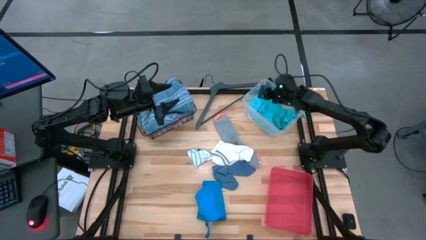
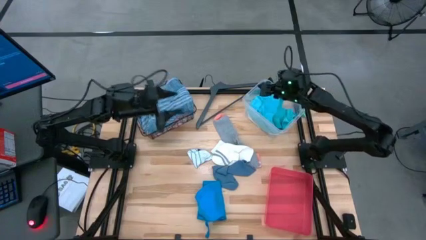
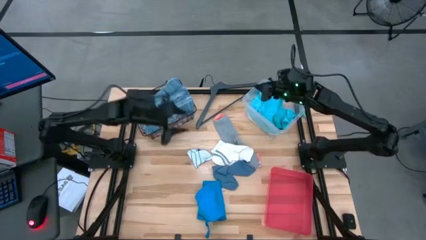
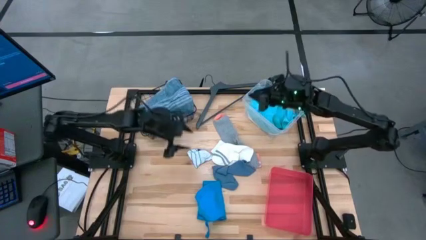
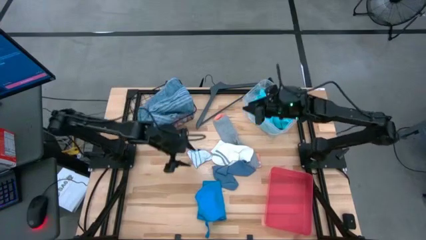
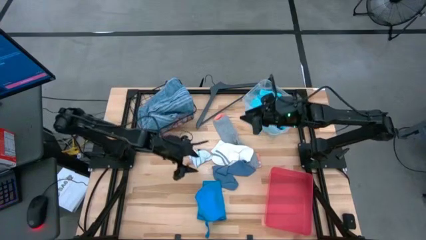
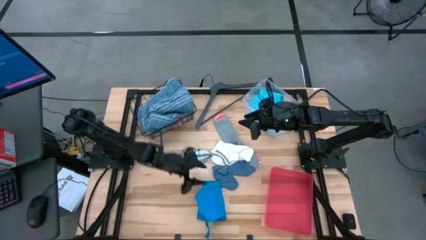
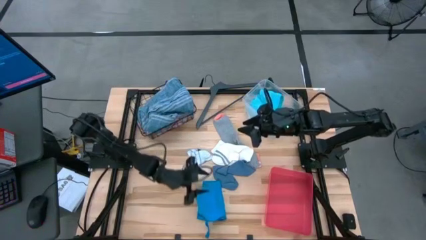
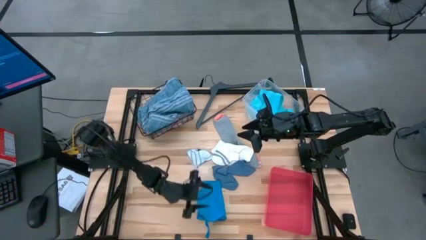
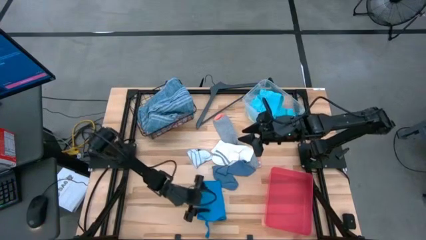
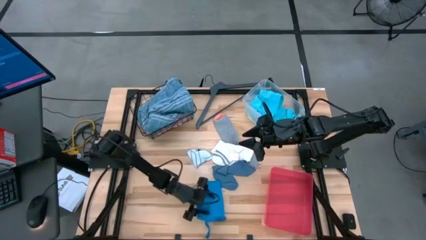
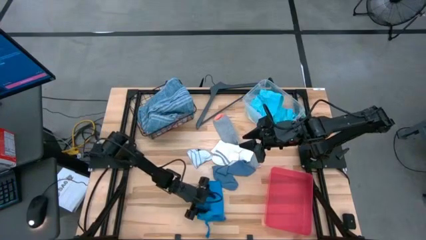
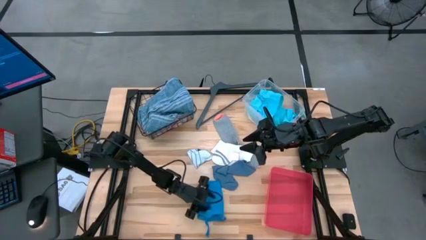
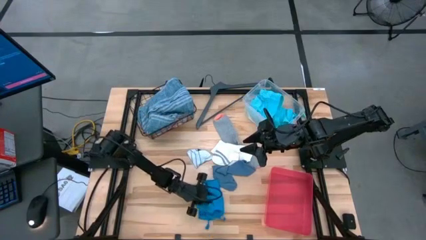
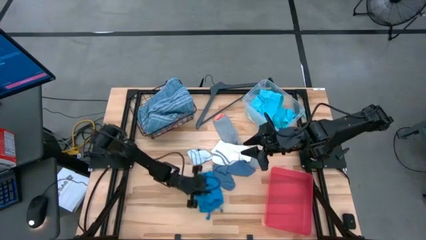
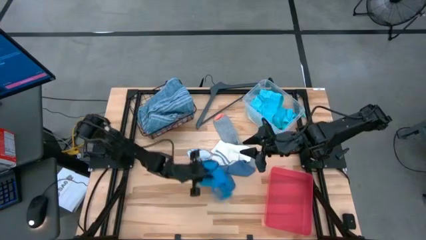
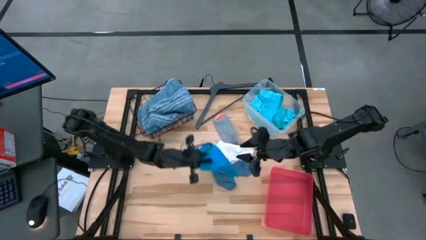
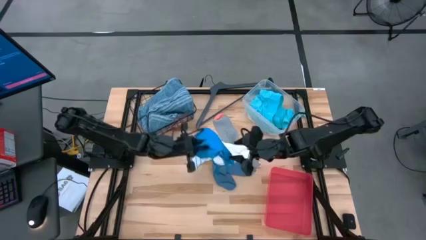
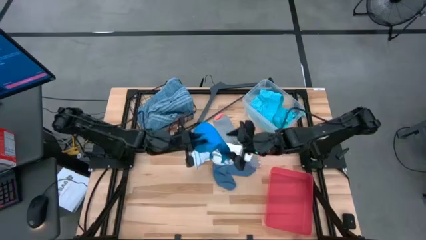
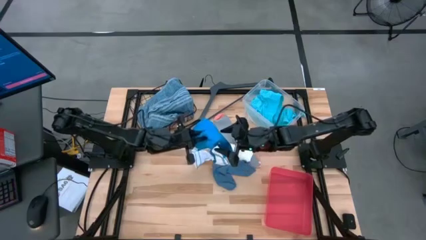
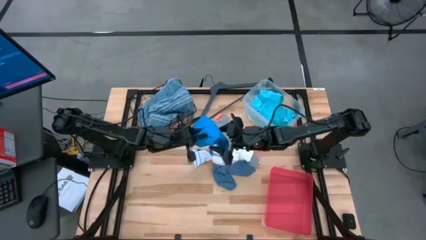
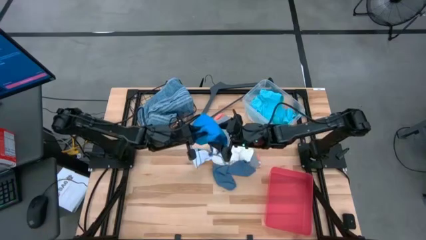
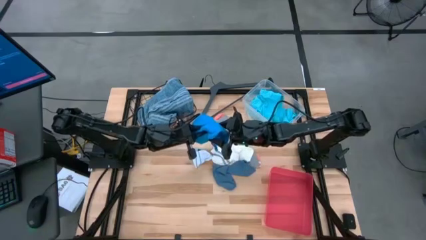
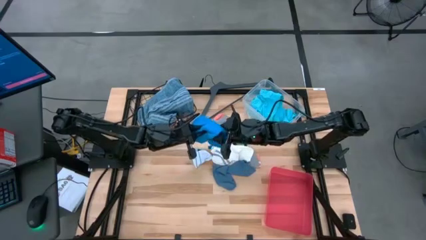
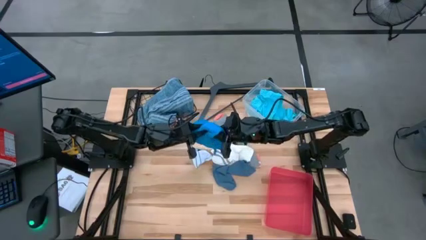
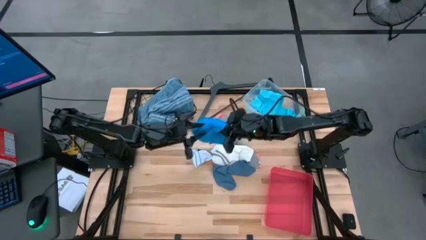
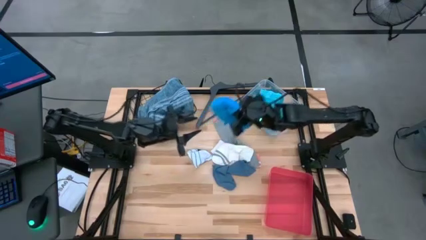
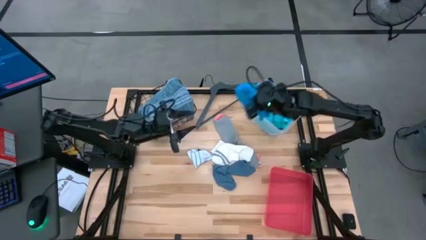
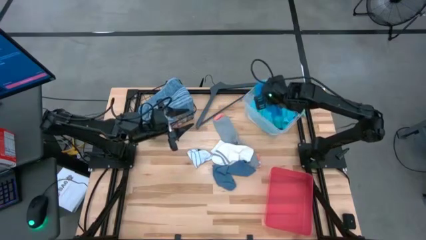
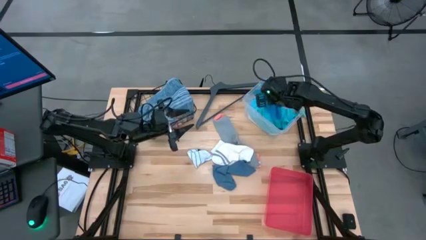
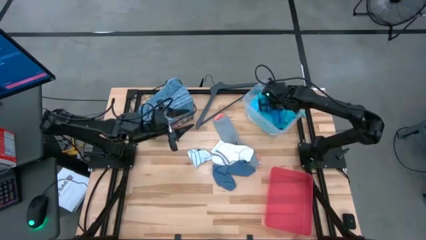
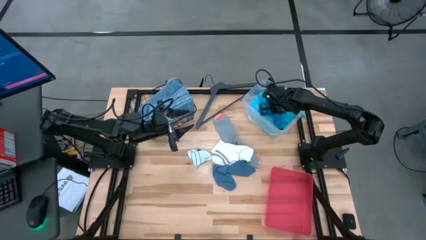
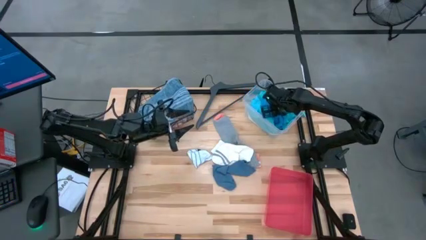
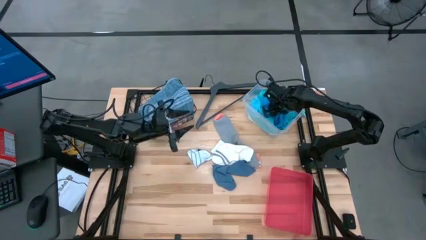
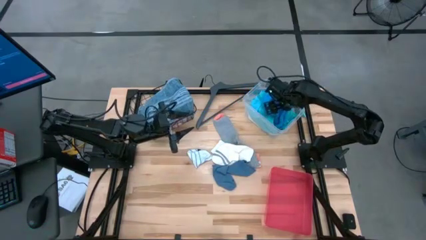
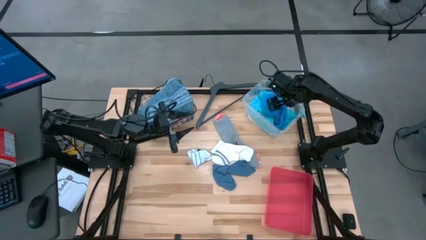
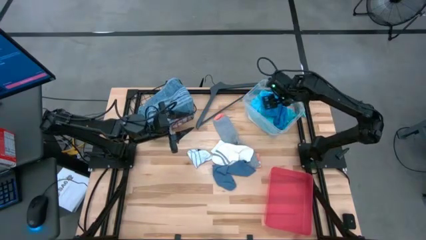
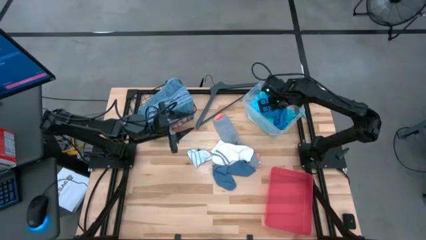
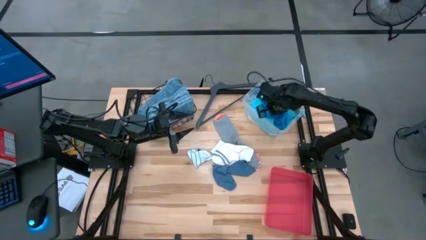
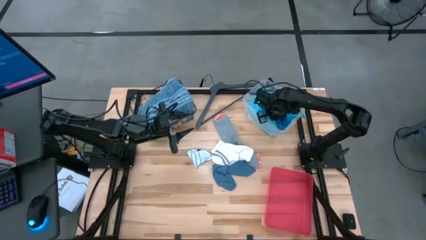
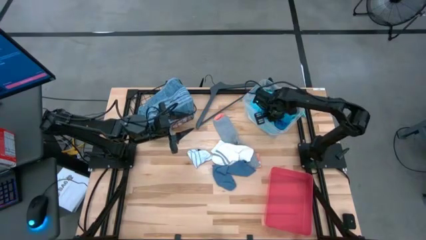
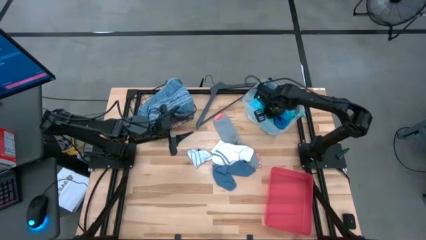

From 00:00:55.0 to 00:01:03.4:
Task: Pick & Place Cloths
Put the blue shorts into the transparent bin

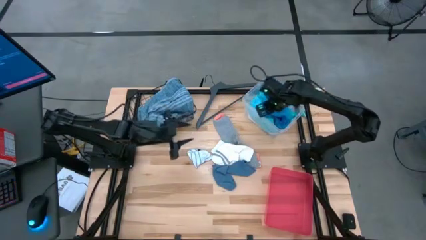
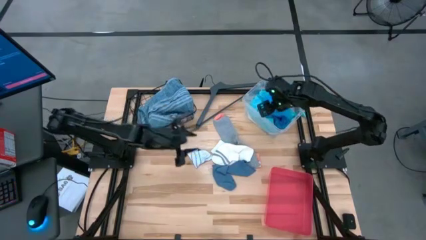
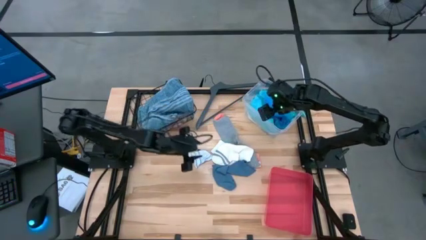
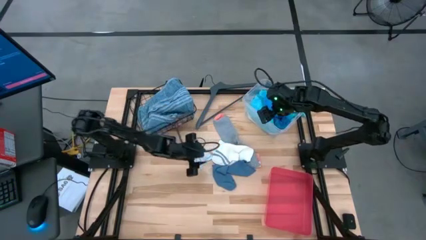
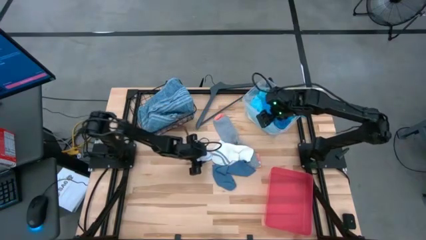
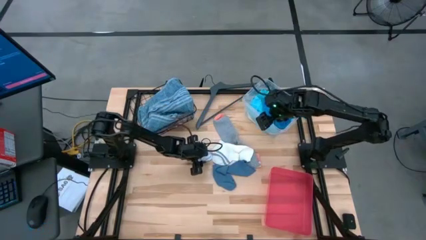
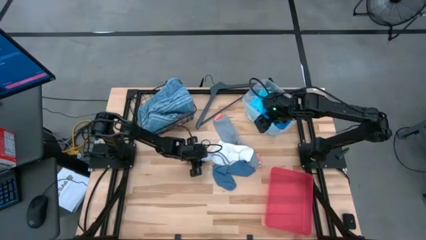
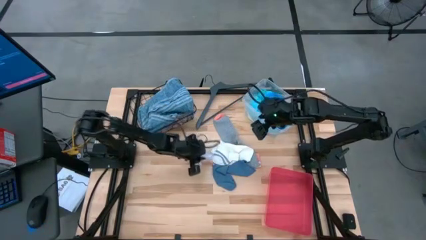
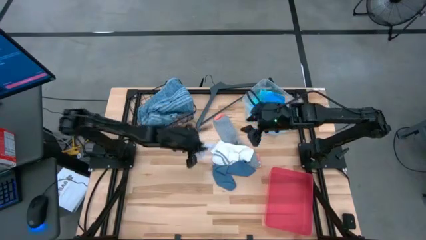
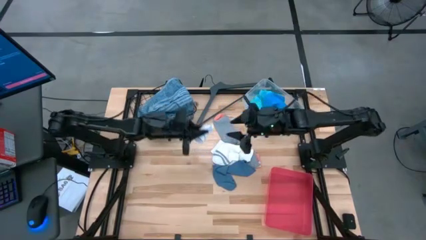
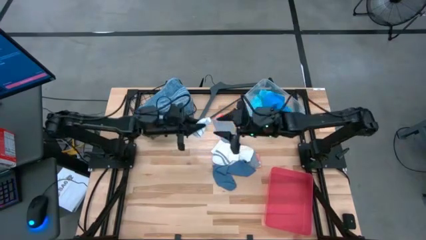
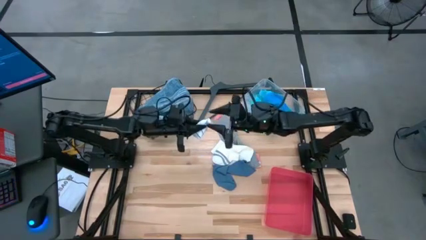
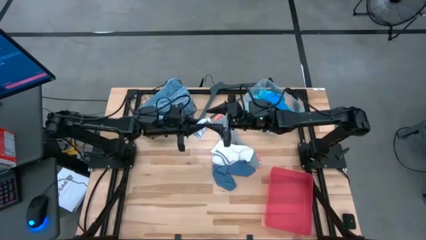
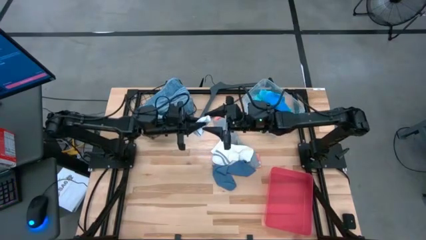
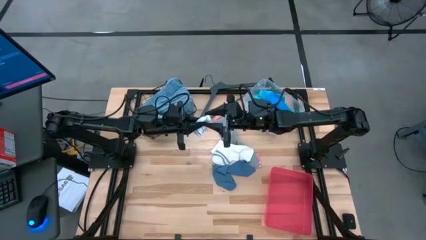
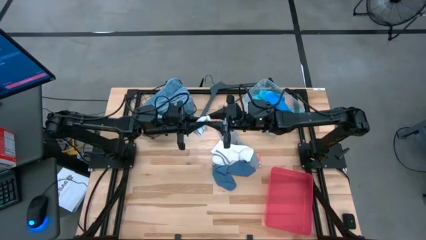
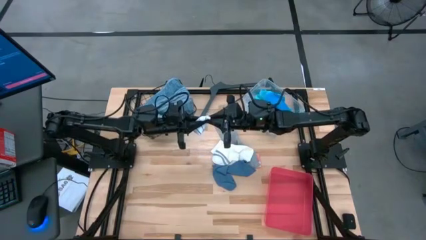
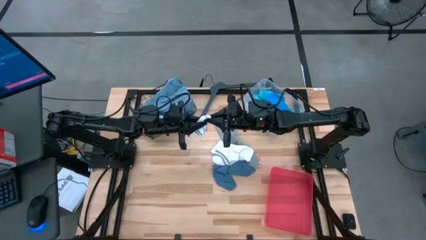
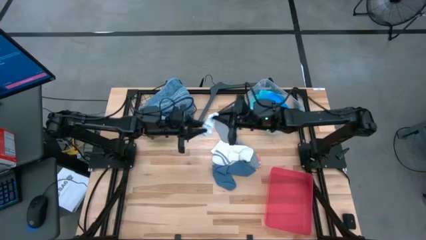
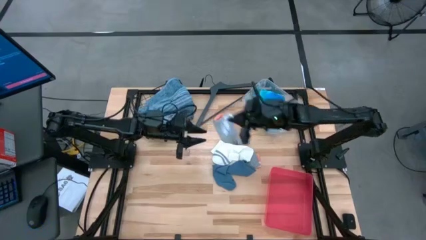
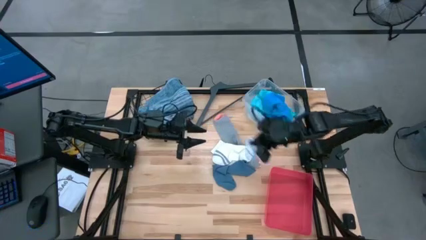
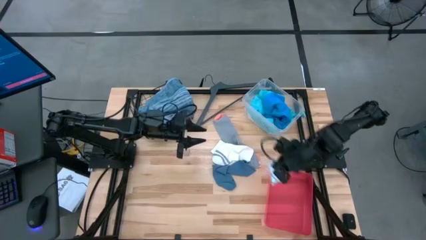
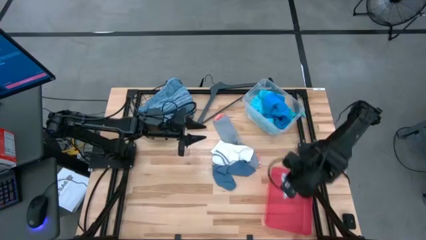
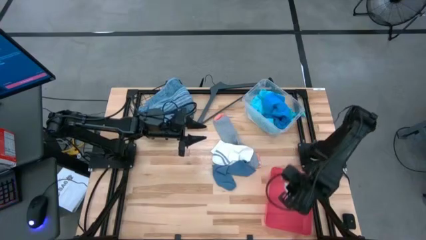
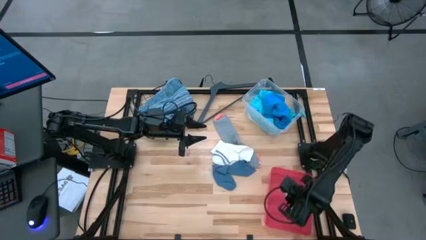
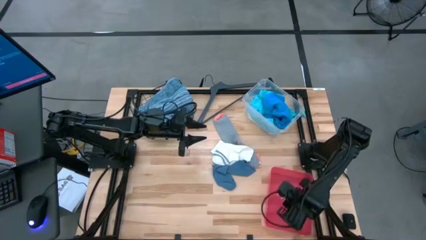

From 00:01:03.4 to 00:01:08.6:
Put the white patterned sock into the pink bin

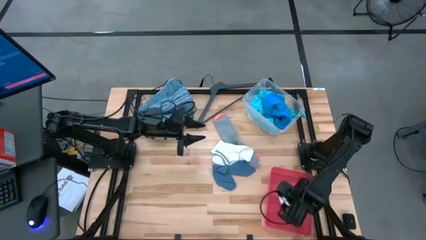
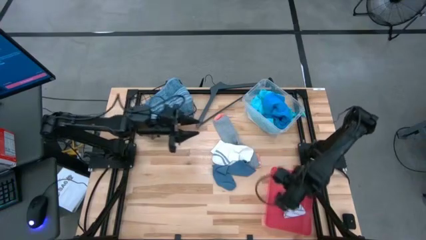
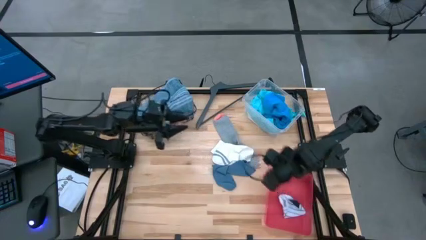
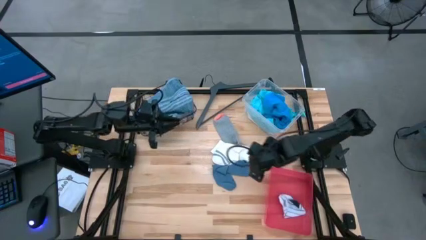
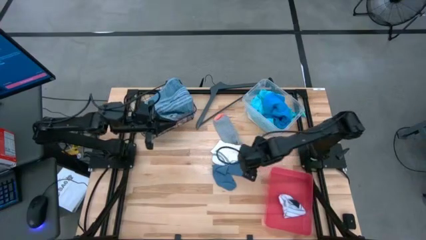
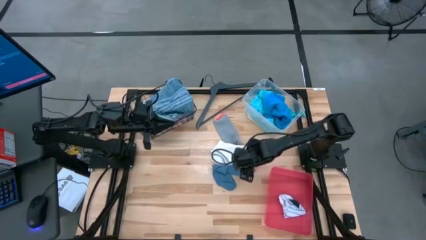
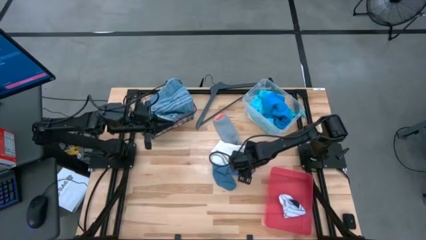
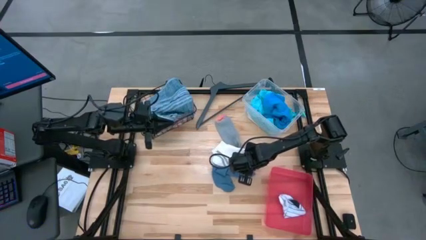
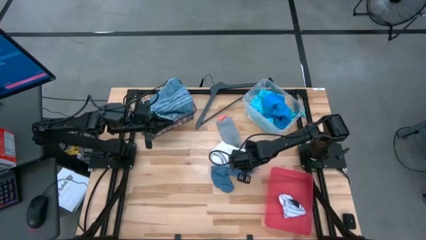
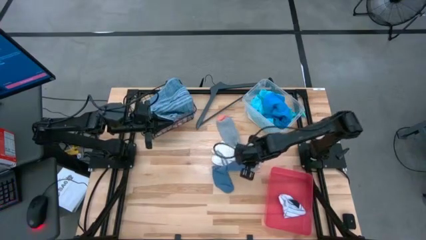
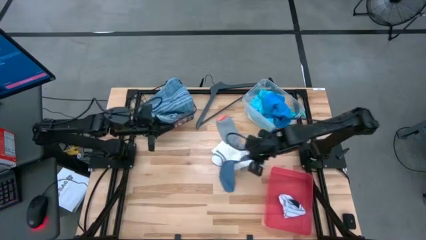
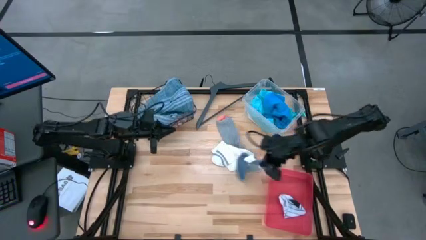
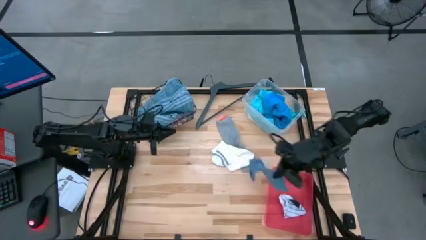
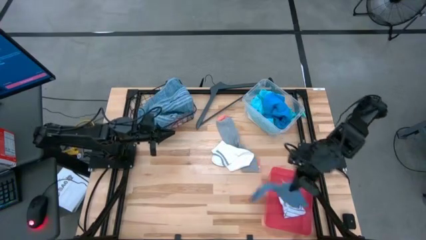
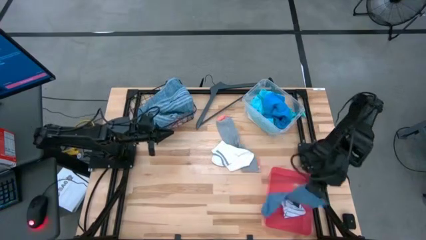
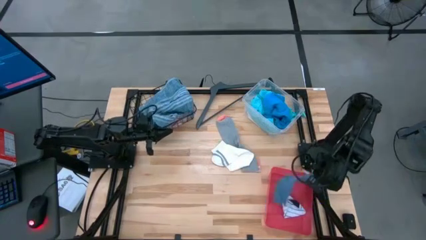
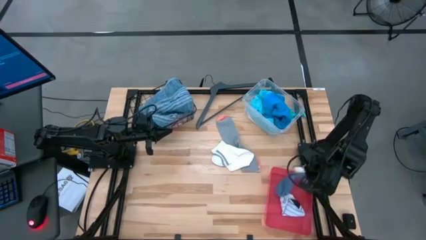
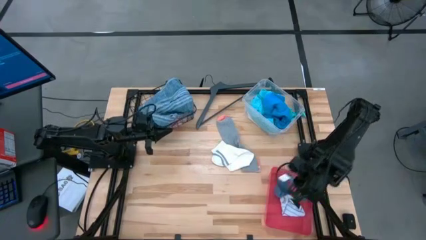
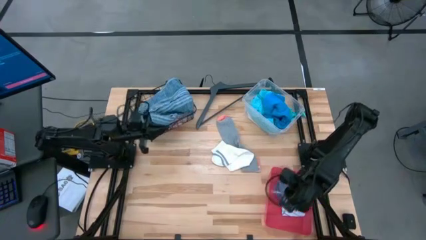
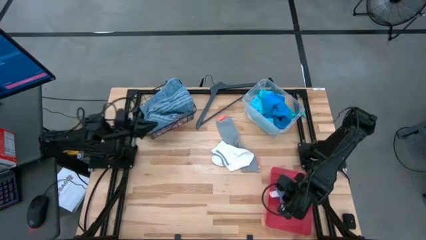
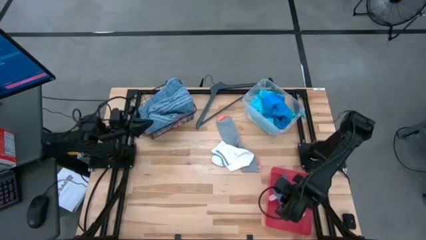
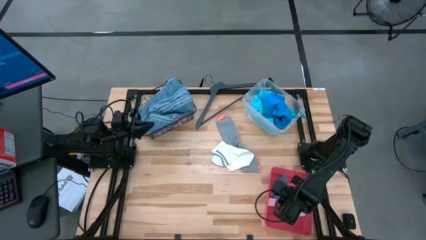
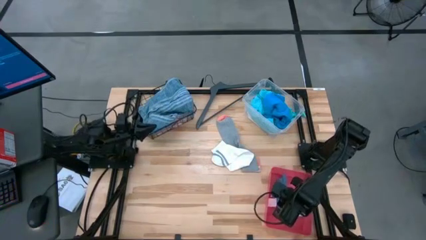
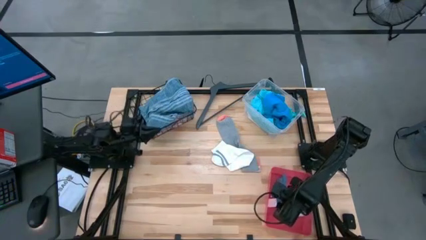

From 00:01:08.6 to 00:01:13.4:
Put the blue sock into the pink bin
